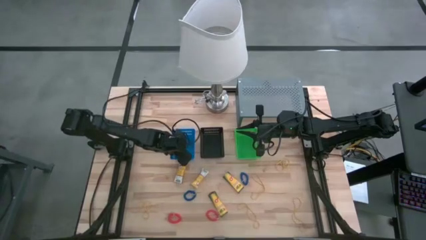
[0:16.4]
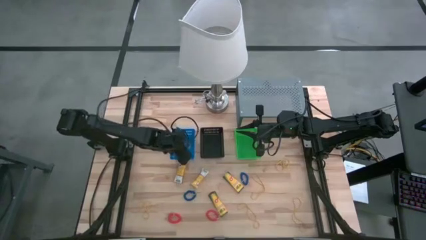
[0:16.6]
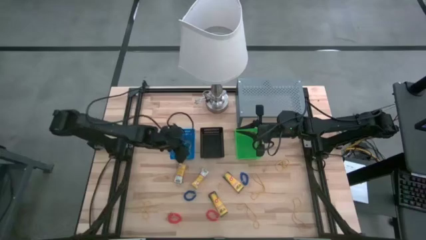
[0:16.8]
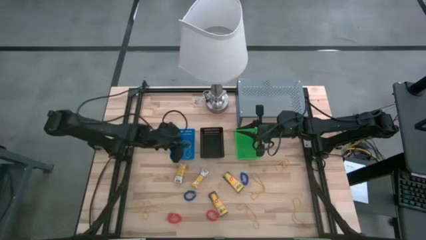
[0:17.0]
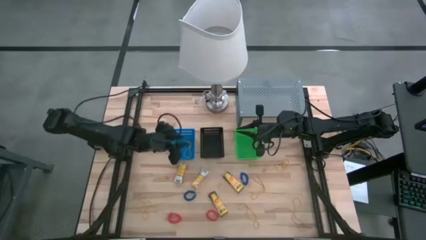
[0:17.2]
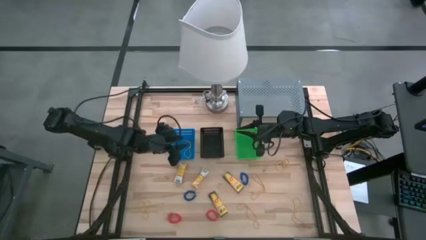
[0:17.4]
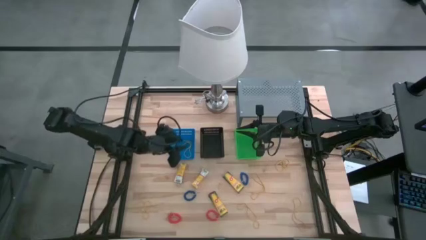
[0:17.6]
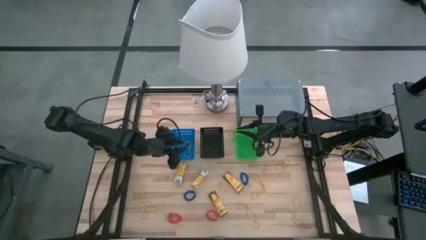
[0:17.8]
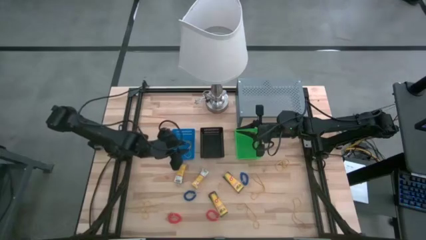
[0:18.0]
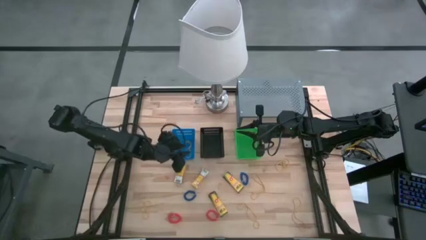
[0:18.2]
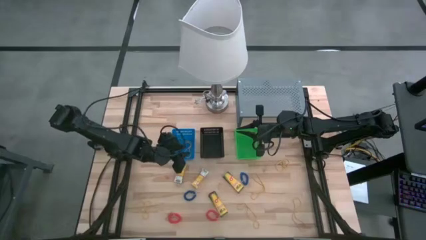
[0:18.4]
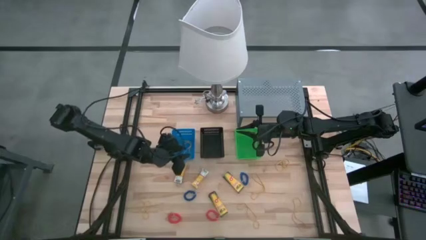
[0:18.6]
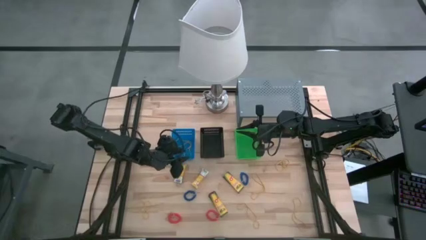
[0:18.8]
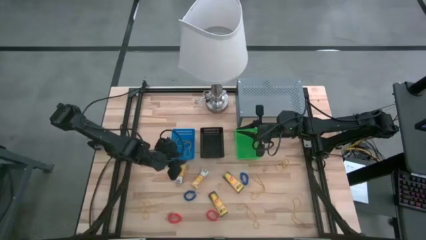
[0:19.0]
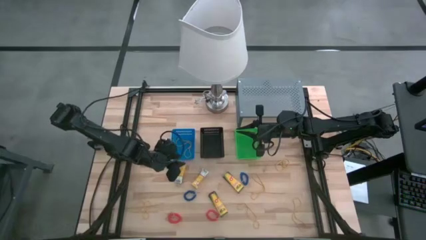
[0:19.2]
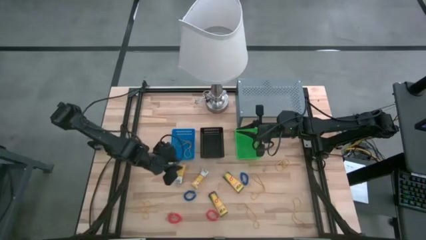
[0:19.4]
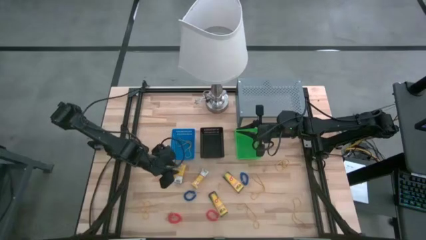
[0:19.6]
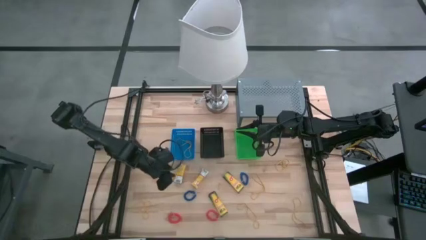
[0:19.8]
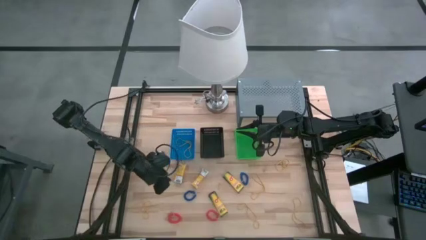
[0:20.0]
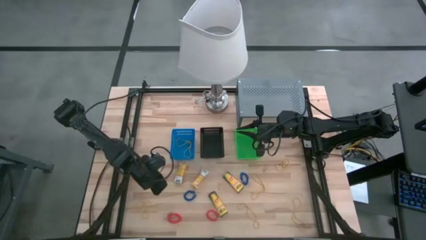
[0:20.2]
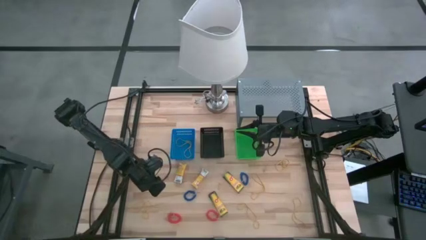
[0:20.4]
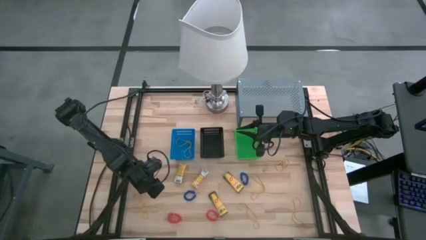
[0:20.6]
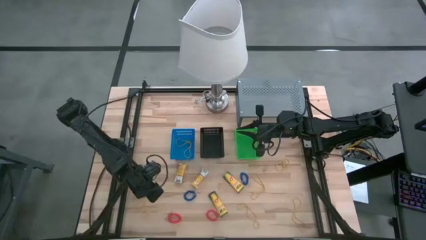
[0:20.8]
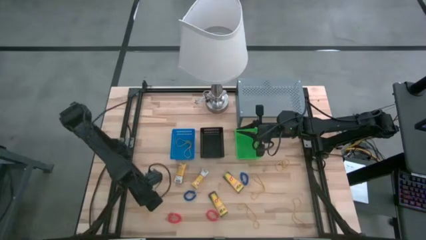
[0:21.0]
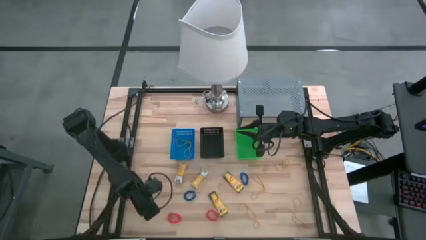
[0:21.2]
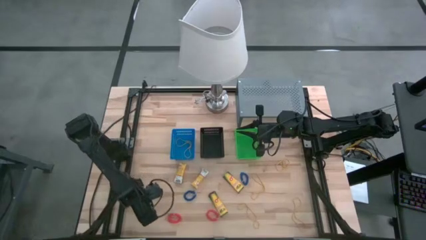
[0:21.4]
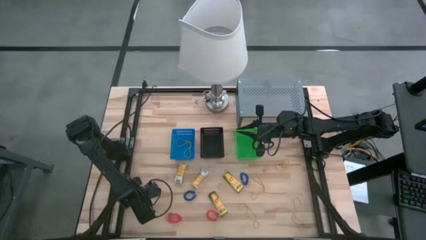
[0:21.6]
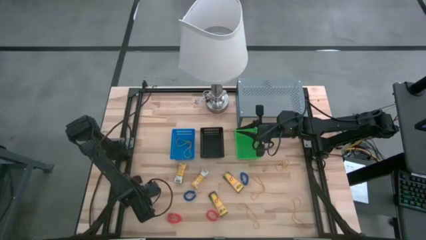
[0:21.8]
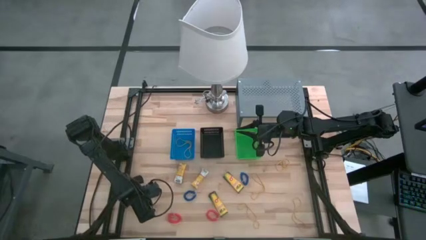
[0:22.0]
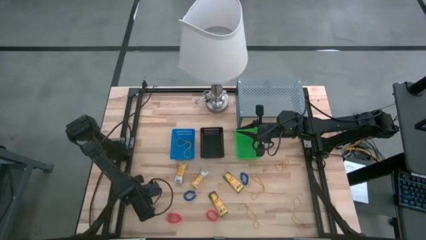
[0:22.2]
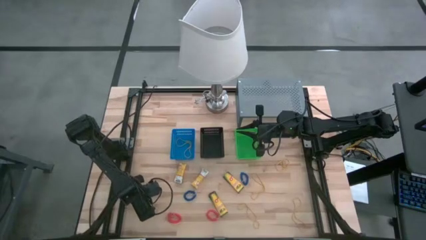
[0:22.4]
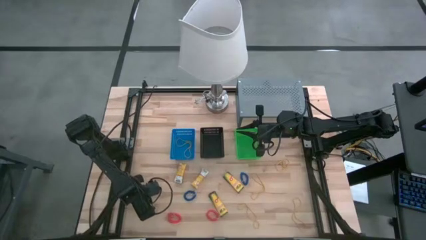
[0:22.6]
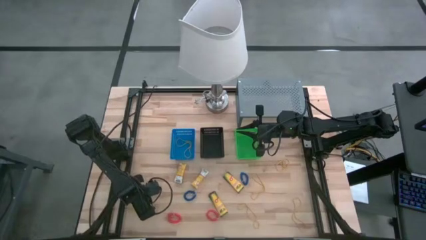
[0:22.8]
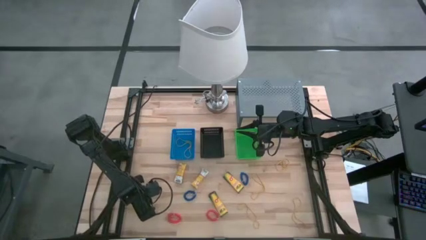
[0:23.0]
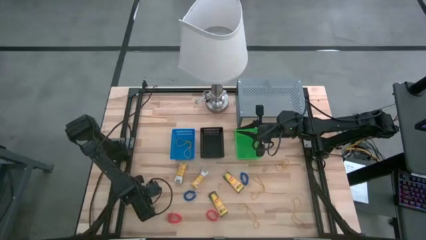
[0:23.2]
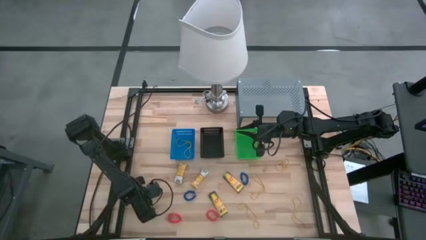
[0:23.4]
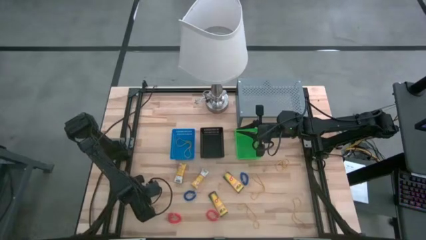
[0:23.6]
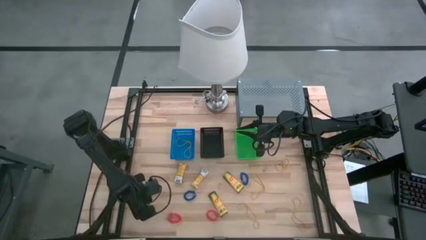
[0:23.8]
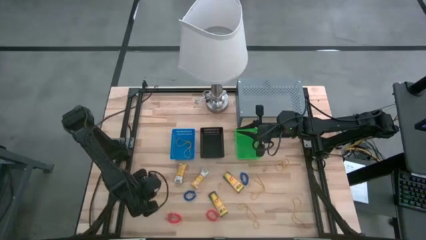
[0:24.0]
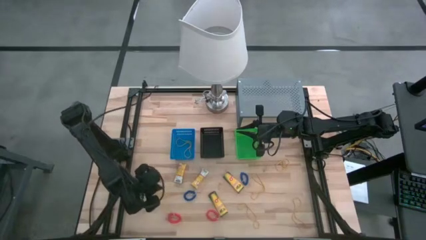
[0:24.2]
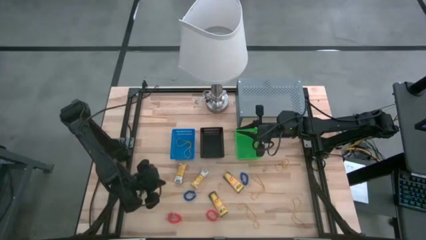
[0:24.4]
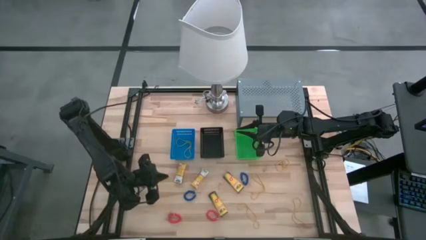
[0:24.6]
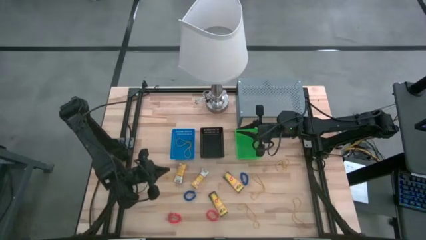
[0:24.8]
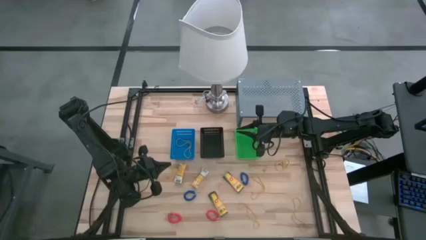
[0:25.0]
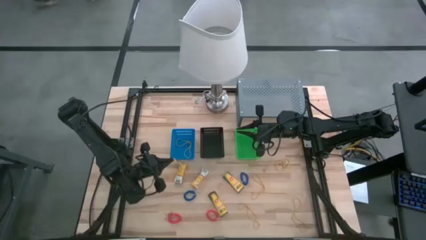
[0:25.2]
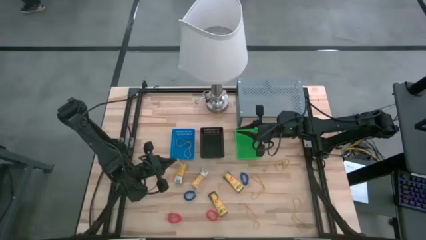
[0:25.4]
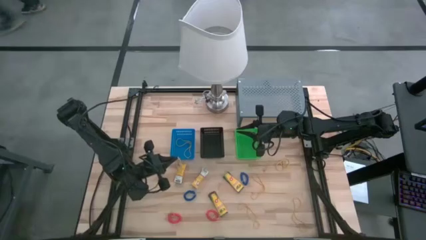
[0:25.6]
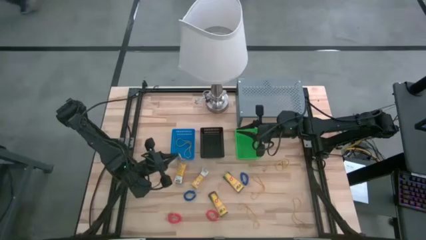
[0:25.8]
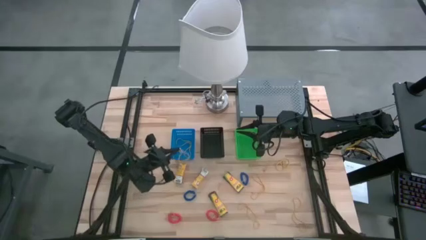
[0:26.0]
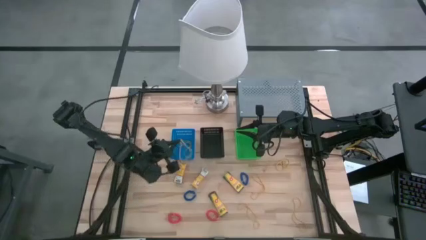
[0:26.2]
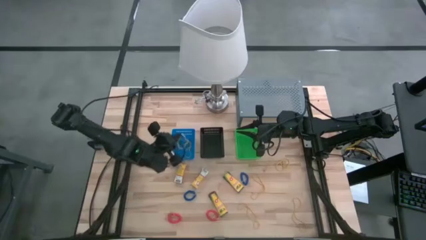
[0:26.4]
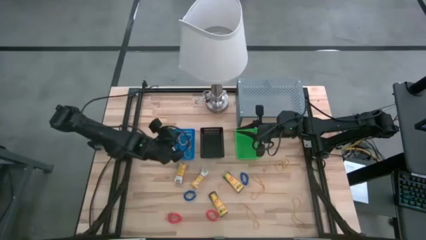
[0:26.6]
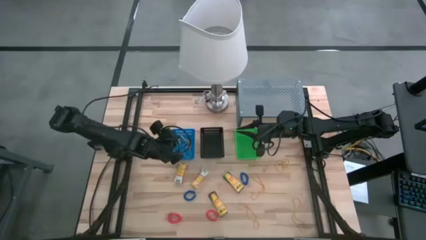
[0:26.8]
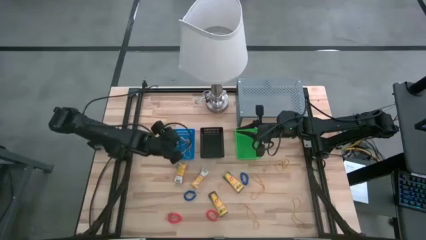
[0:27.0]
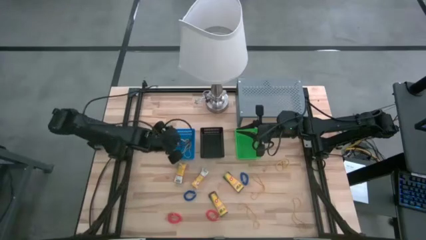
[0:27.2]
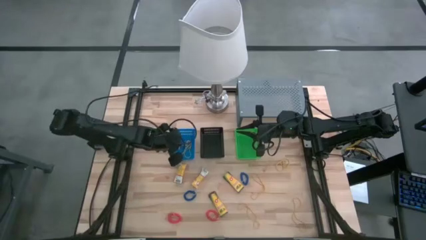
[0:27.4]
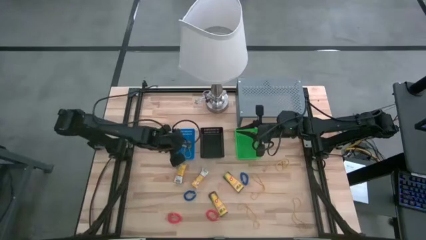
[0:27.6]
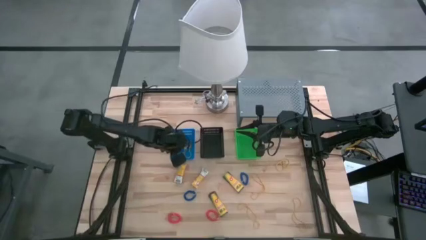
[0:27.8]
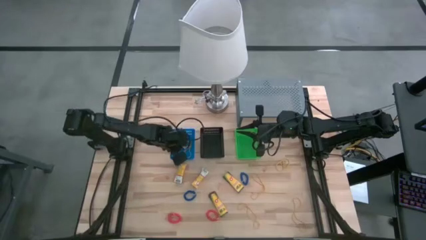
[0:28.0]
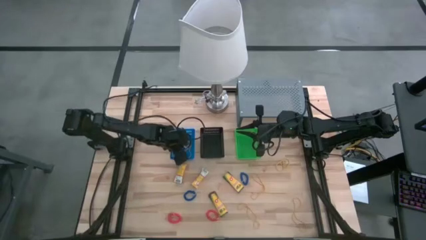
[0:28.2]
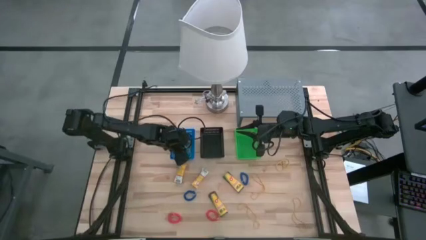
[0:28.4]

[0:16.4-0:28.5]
Task: Pick & Place Office Desk Supplies
Put the yellow rubber band into the blue bin
